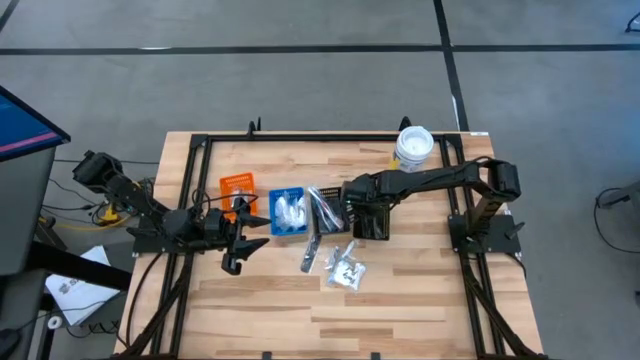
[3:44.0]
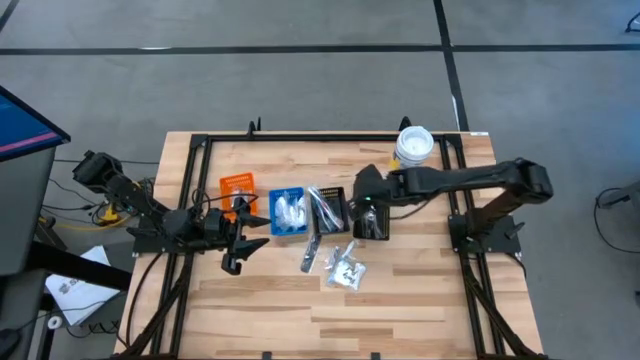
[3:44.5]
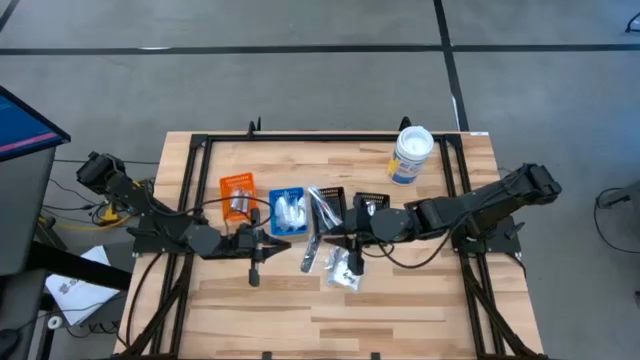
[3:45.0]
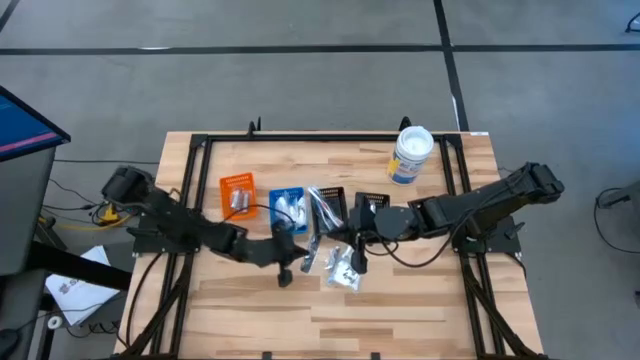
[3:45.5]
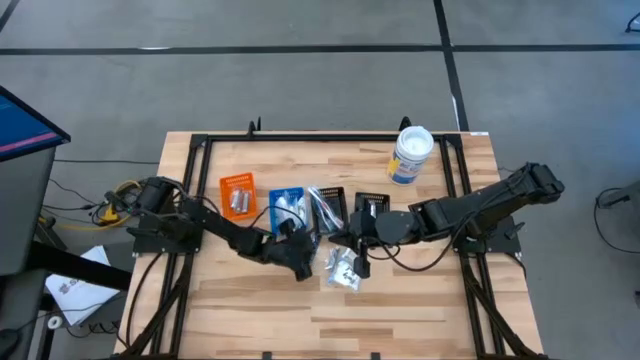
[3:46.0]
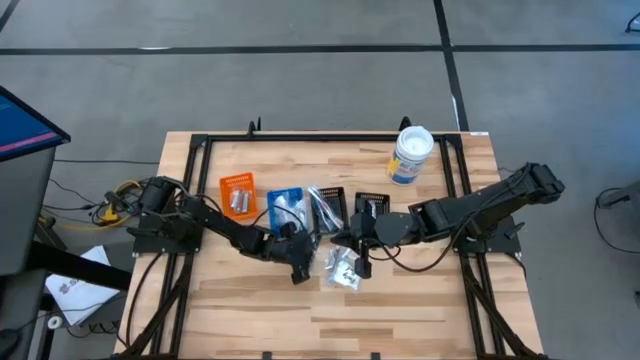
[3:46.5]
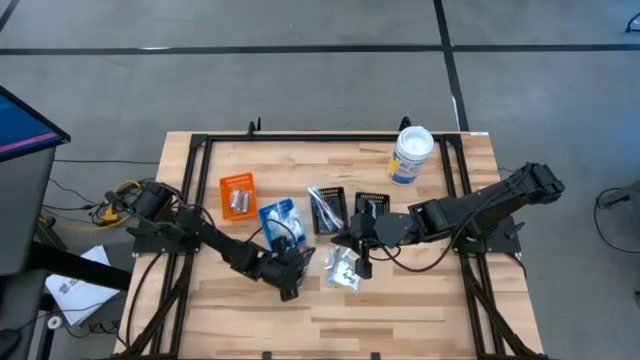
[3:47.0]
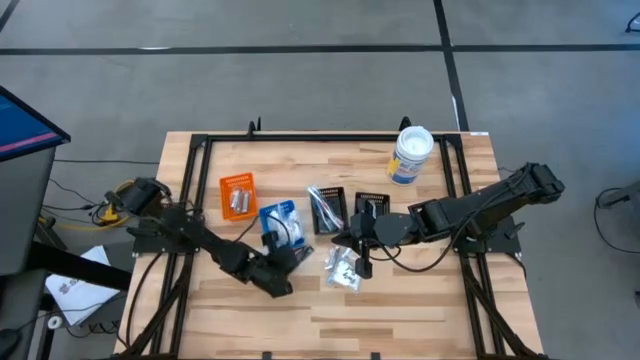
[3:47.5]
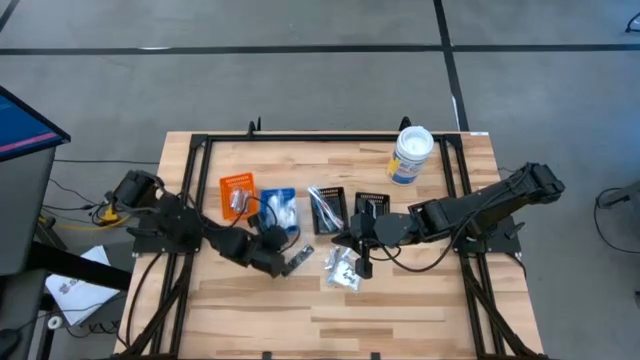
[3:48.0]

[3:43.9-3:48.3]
Task: Pick & Place Travel size toiletries
Adjust the black comb

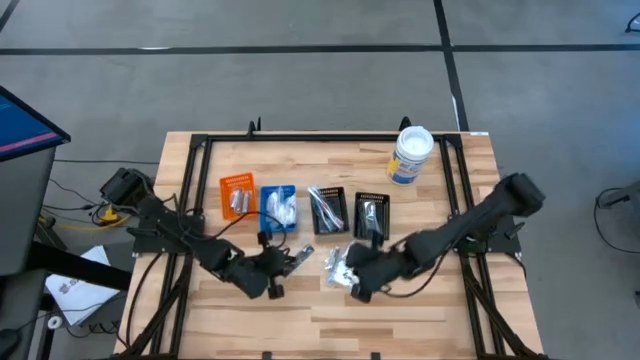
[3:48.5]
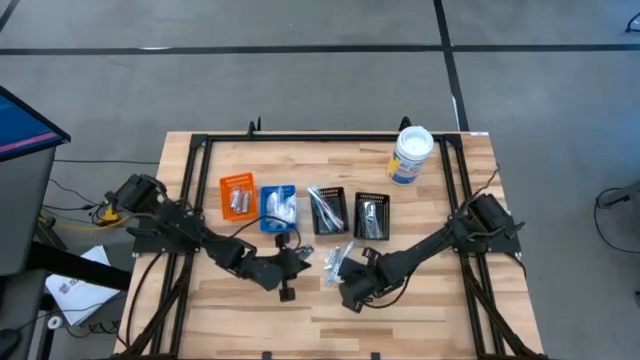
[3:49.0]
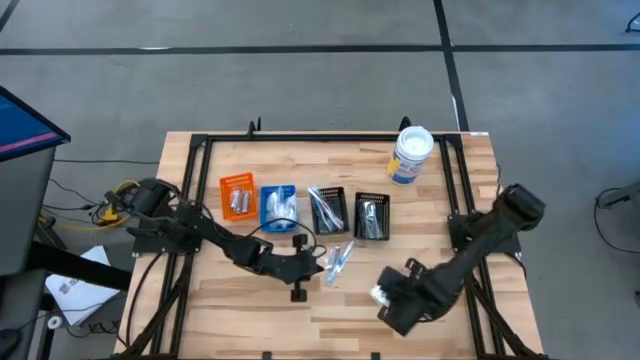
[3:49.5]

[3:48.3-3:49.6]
Adjust the pack of cotton buds

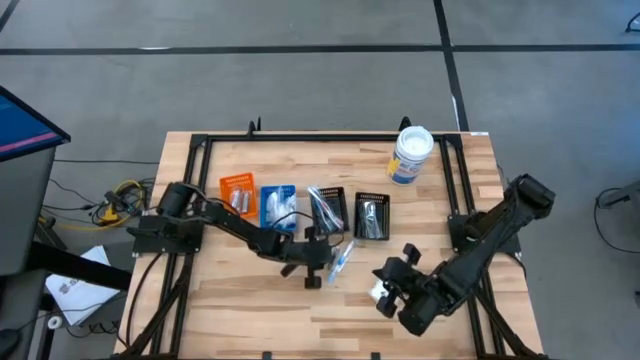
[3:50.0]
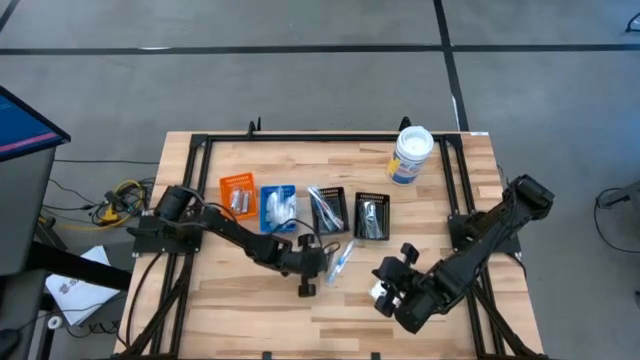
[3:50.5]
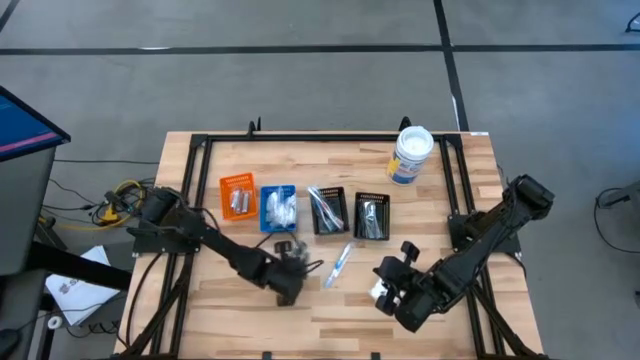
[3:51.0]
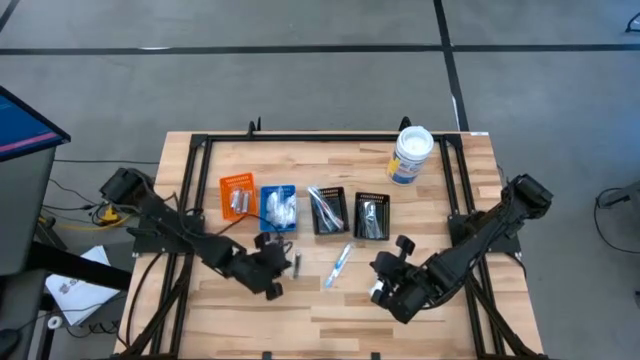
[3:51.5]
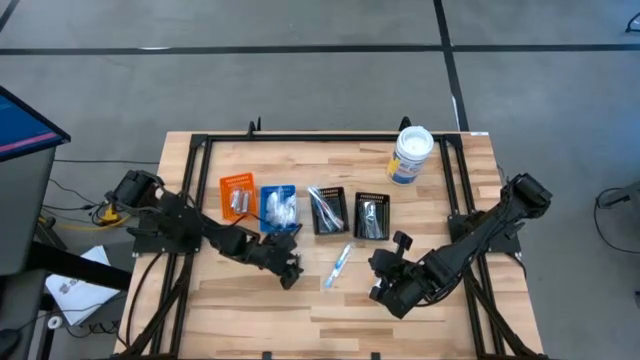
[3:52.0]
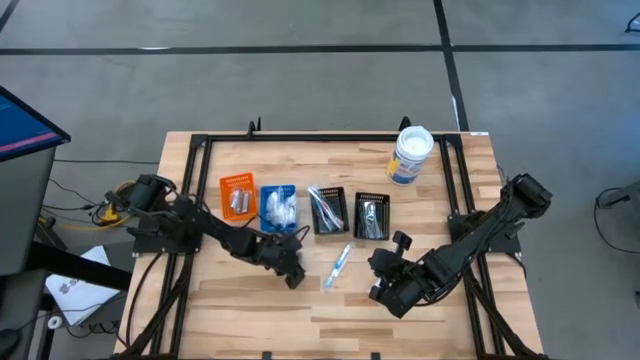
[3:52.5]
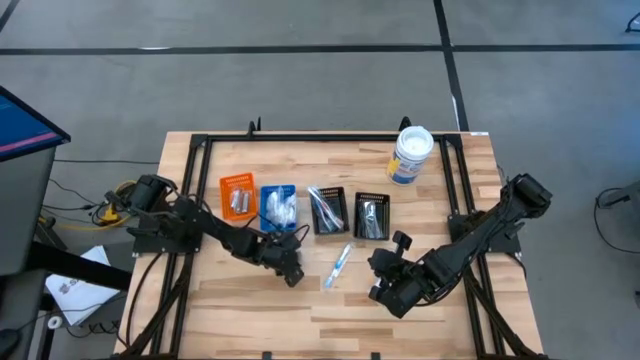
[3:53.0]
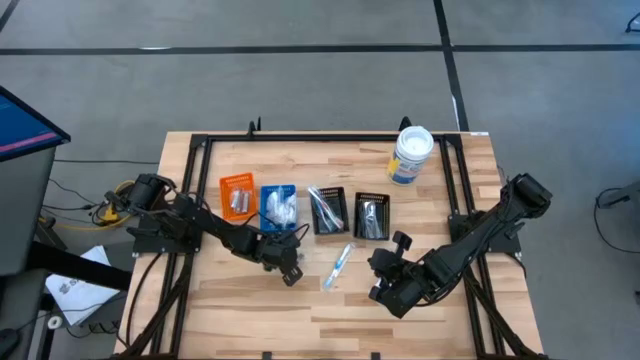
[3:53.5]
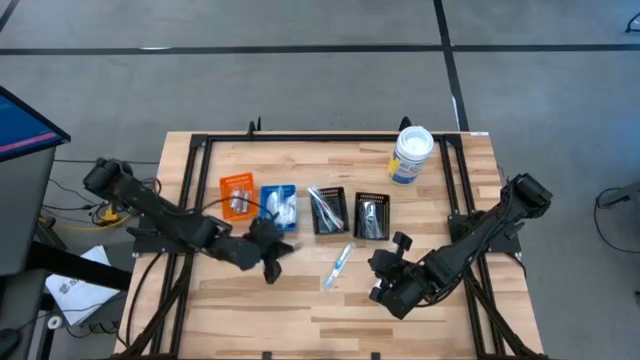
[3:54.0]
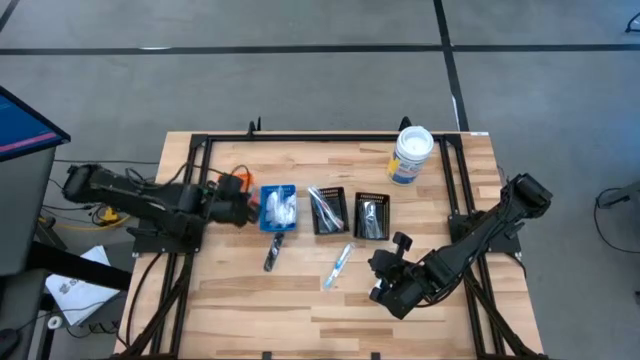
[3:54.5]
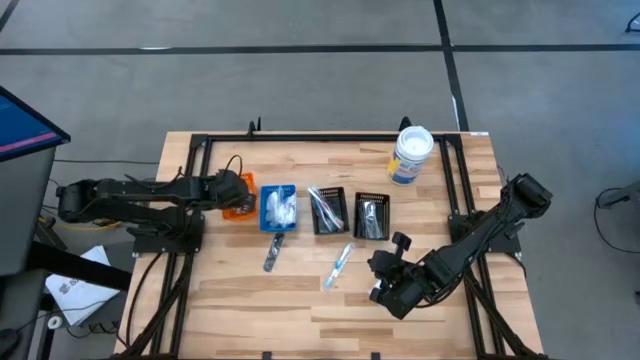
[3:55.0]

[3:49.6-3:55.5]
Put the nail clippers into the orange bin

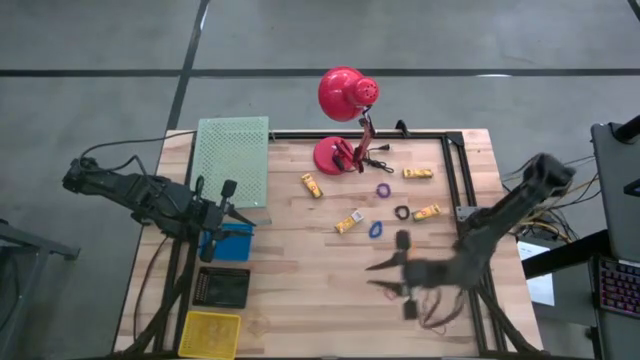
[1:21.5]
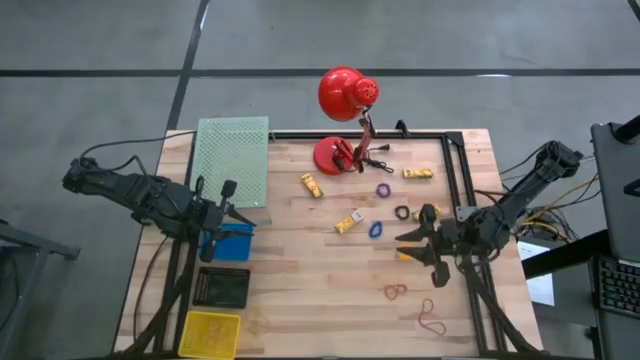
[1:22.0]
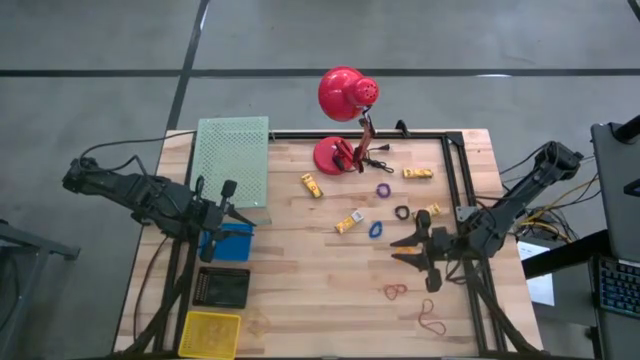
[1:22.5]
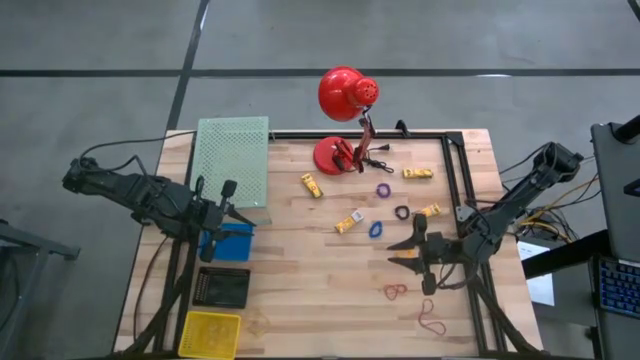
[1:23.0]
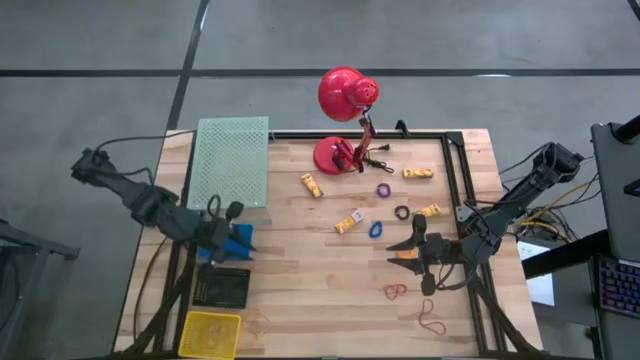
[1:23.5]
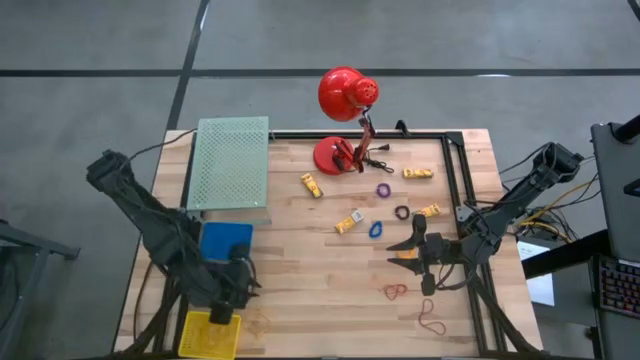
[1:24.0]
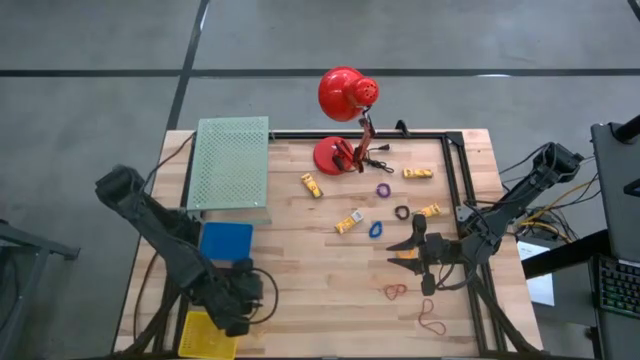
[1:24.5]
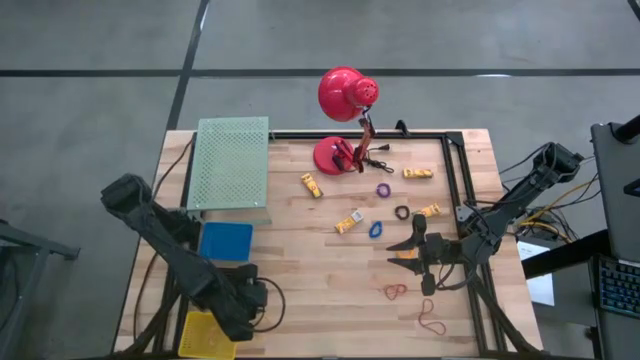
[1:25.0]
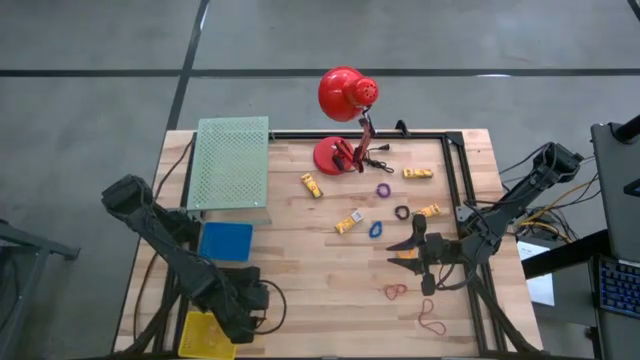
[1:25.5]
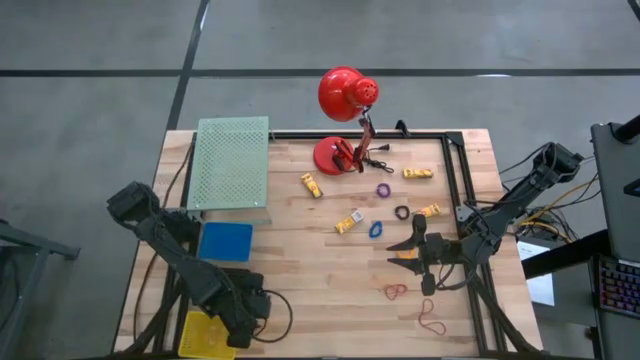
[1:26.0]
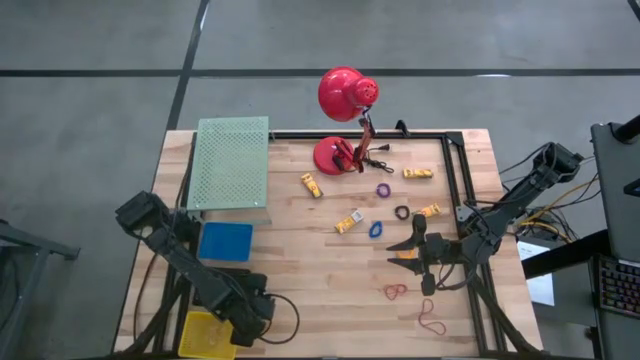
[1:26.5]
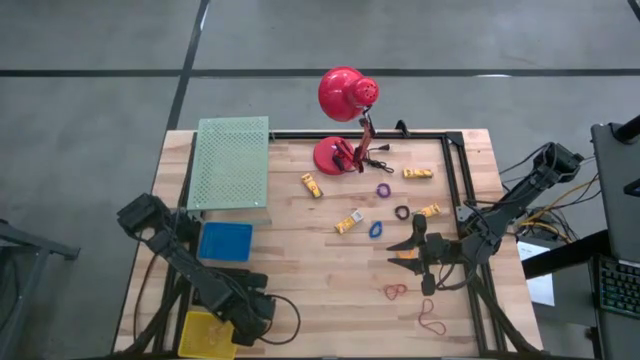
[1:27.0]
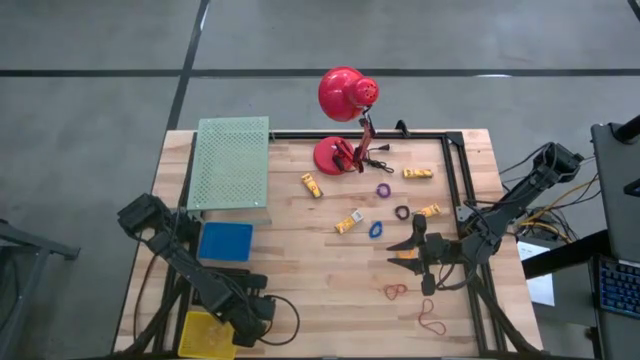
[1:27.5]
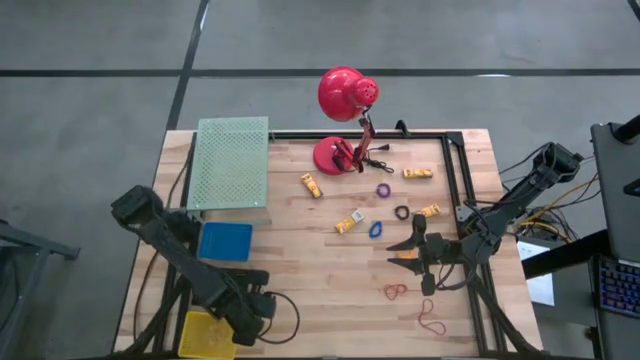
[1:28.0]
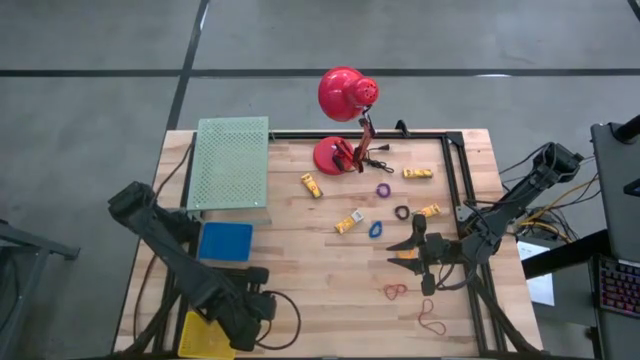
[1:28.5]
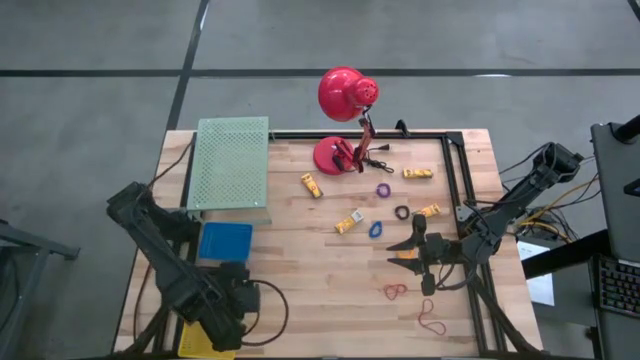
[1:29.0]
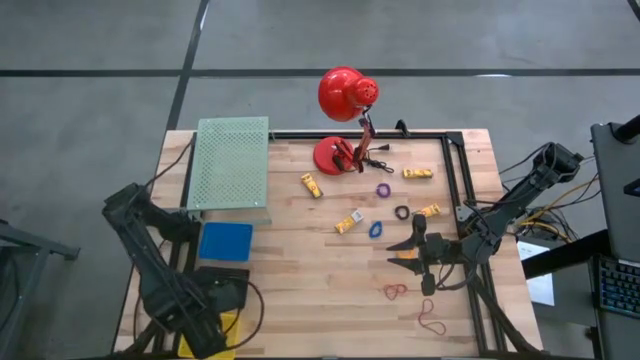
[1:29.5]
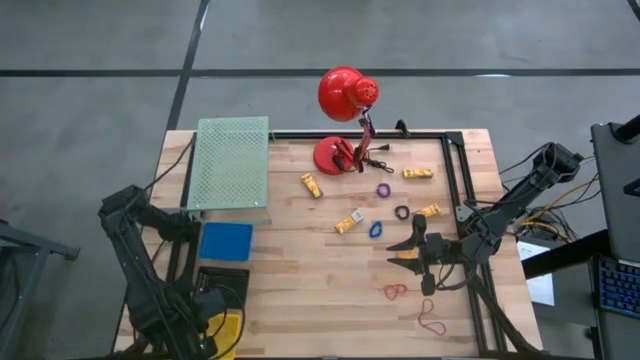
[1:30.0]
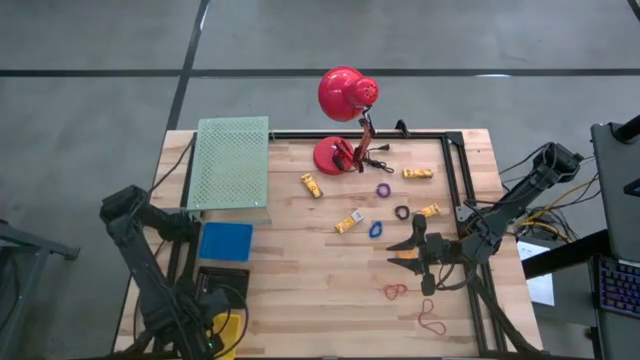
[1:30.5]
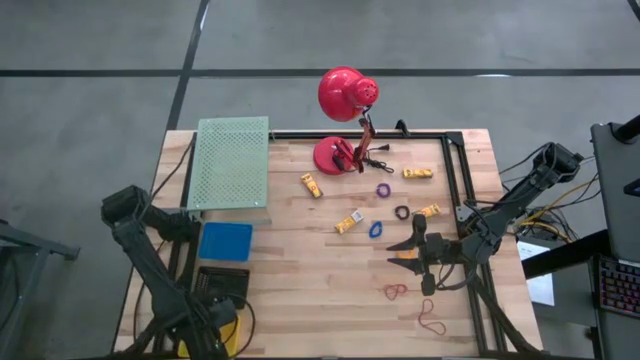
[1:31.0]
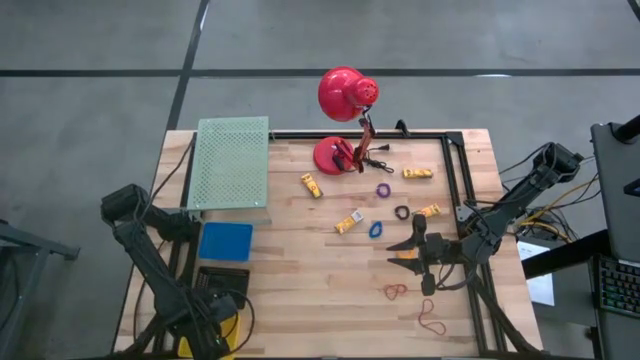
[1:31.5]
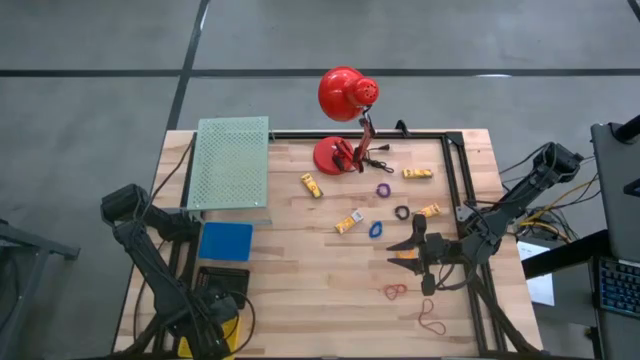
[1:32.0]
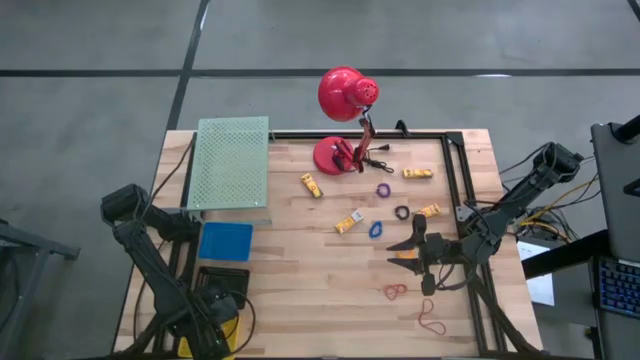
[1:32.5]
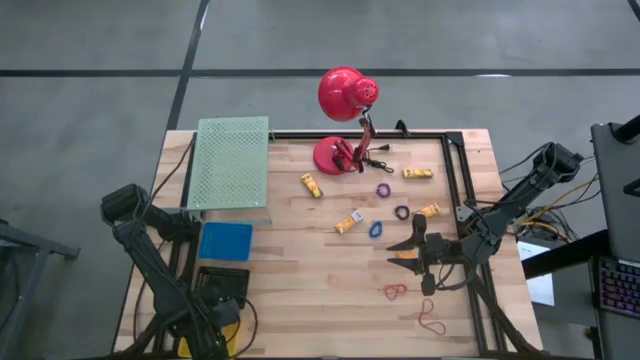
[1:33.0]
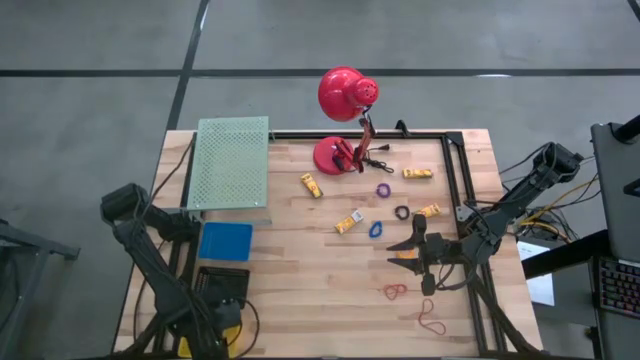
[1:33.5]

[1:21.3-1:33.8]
Task: Pick & Place Office Desk Supplies
Put the yellow rubber band into the yellow bin
